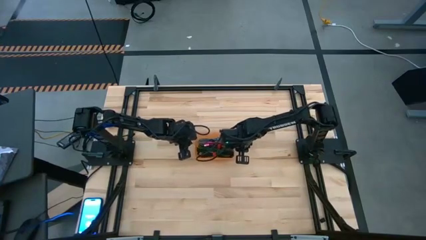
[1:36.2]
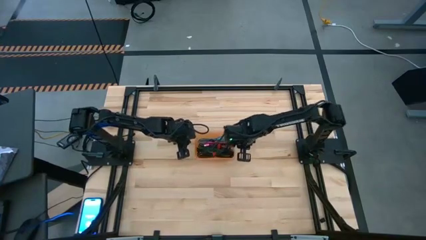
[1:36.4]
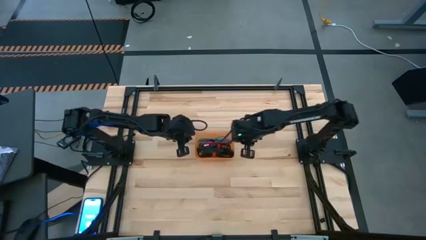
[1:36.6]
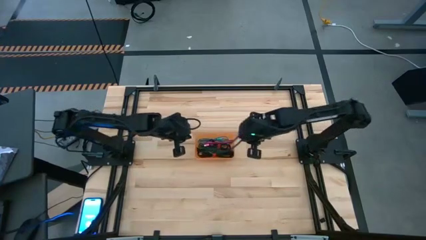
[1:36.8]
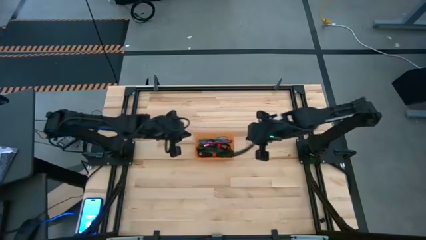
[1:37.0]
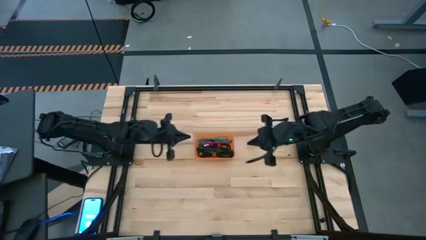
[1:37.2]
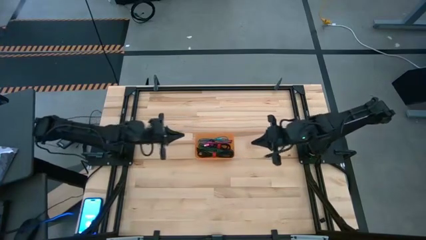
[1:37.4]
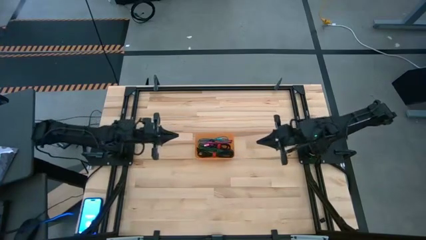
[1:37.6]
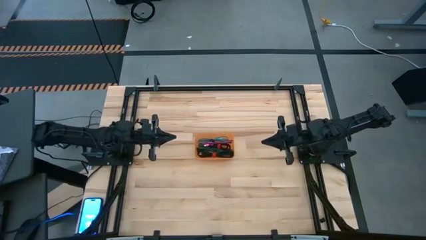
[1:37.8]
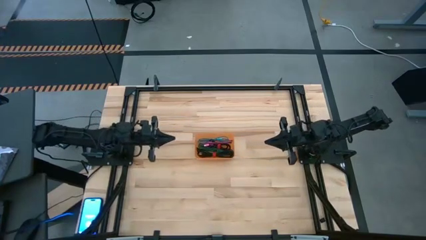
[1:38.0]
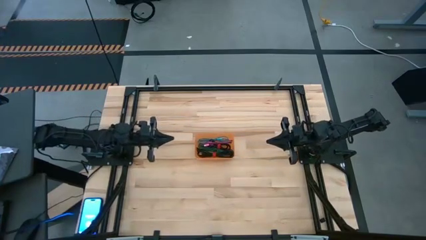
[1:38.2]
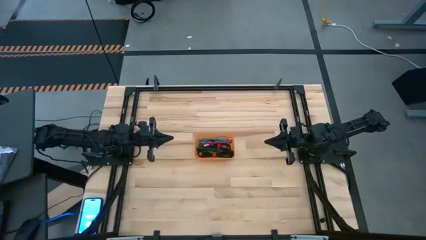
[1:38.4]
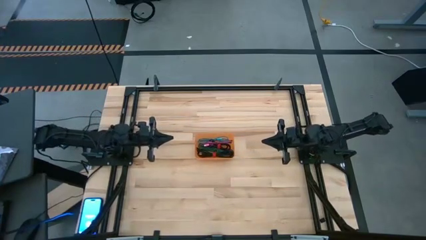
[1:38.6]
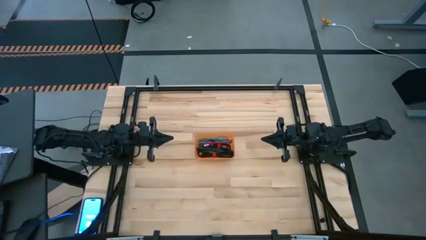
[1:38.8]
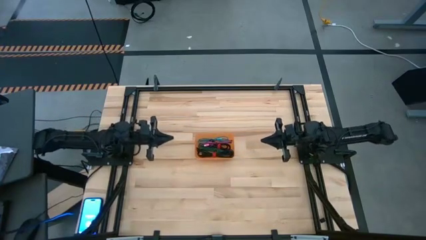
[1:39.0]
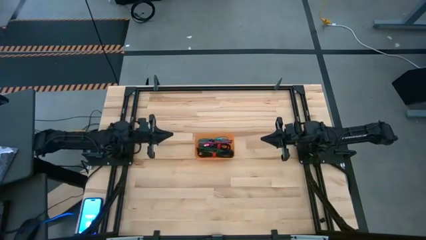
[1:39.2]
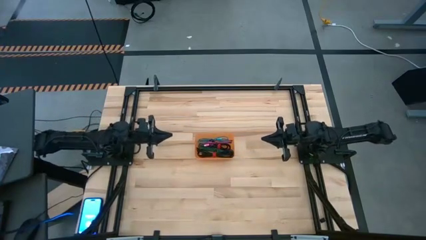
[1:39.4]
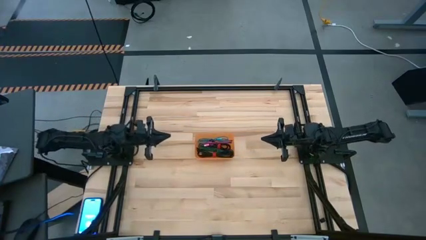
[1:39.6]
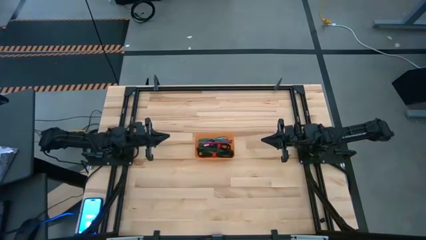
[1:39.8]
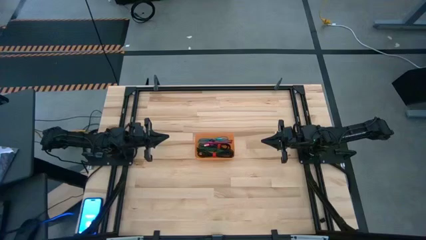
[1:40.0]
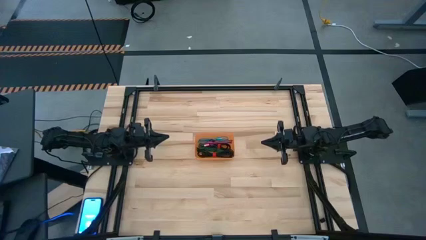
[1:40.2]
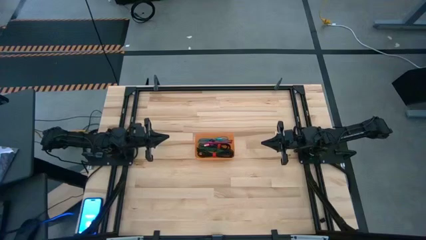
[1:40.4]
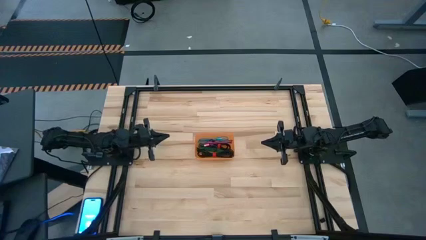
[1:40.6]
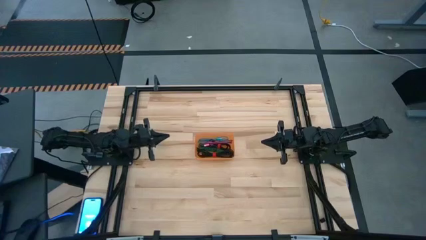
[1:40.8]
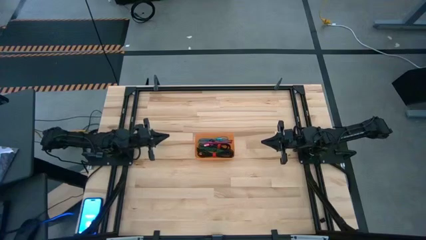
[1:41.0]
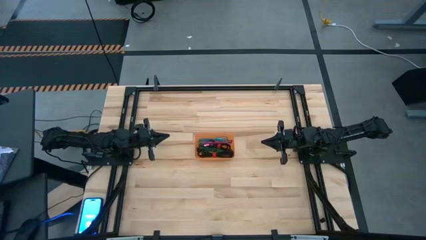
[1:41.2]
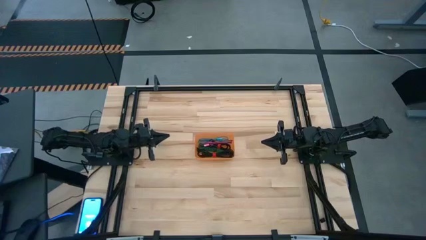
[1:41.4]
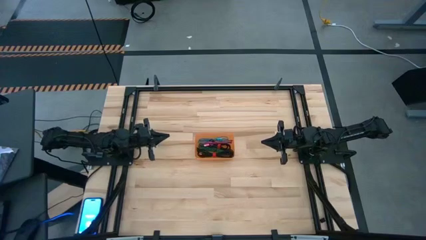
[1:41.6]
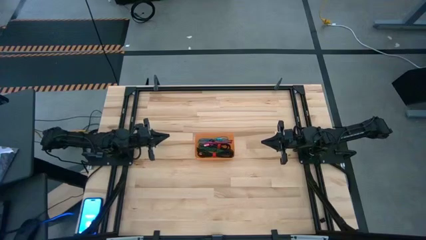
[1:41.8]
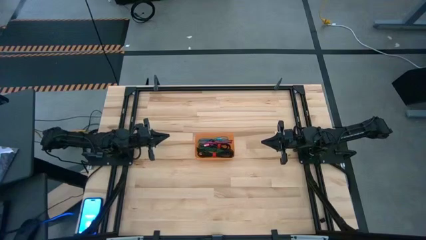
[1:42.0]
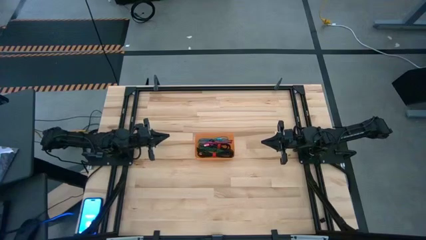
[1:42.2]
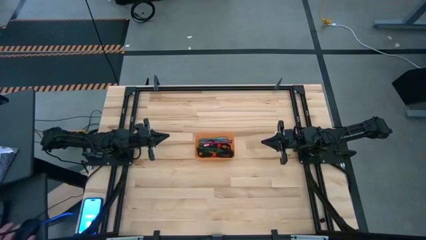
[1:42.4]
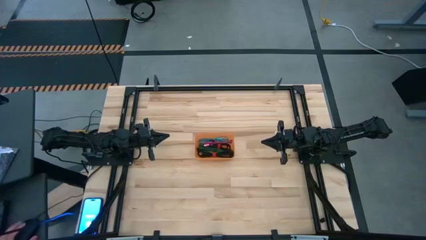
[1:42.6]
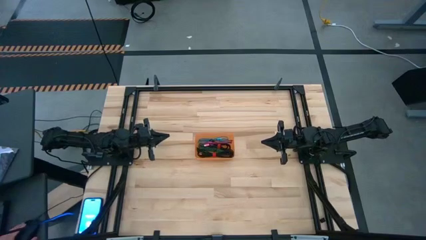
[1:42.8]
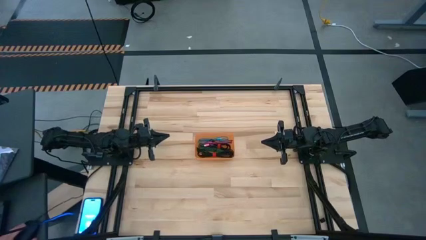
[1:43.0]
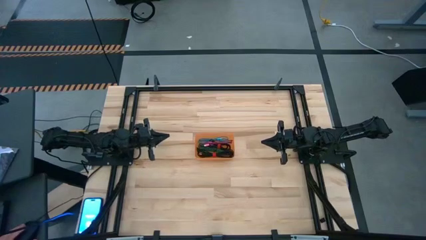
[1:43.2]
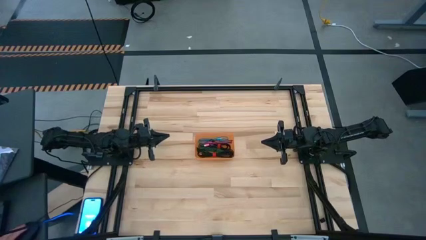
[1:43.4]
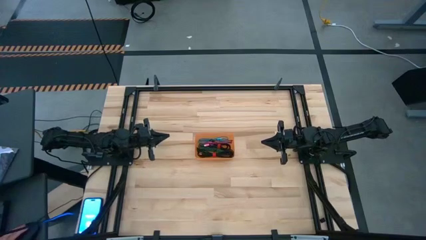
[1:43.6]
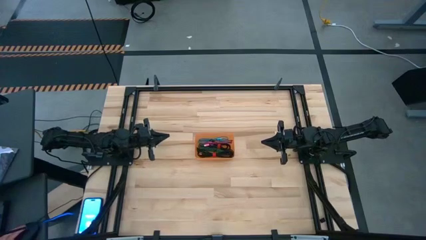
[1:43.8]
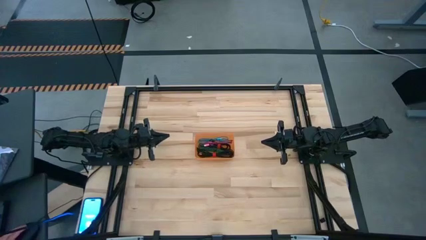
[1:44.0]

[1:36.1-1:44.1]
Task: Pick and place USB-C Cables
Return to Home Position

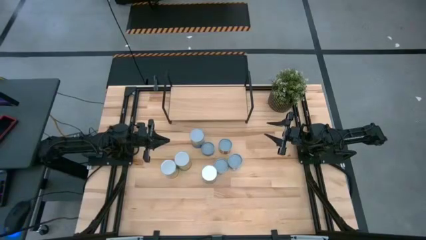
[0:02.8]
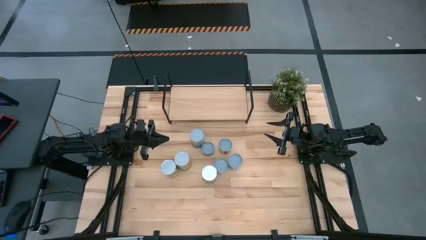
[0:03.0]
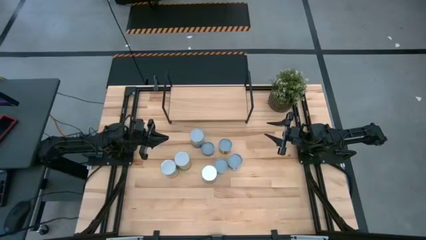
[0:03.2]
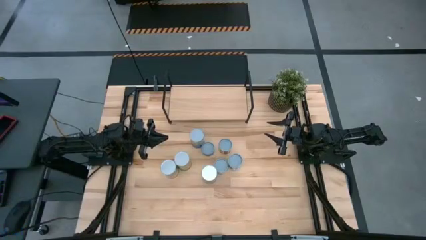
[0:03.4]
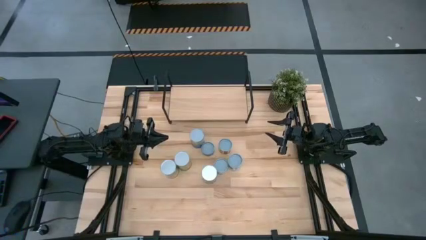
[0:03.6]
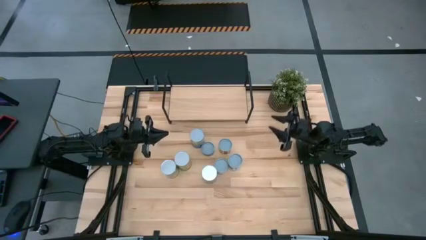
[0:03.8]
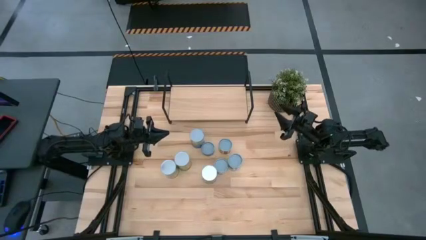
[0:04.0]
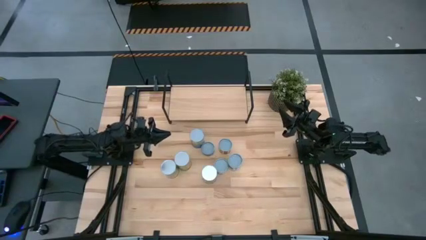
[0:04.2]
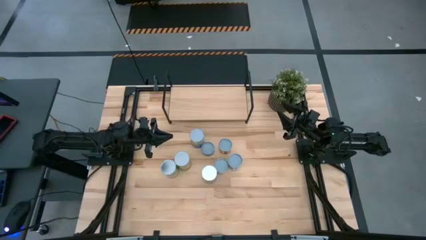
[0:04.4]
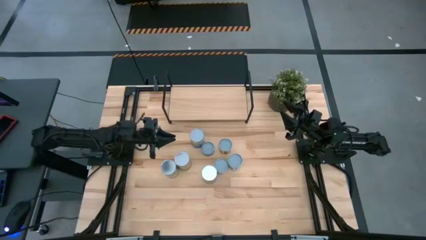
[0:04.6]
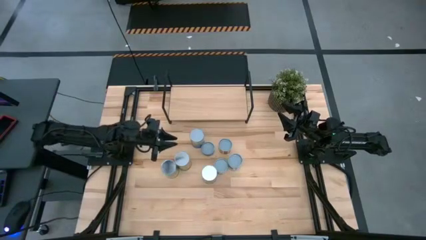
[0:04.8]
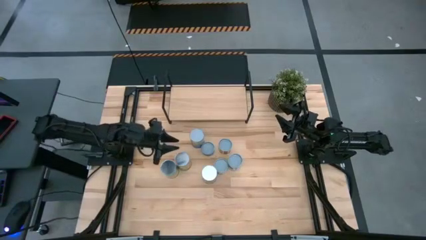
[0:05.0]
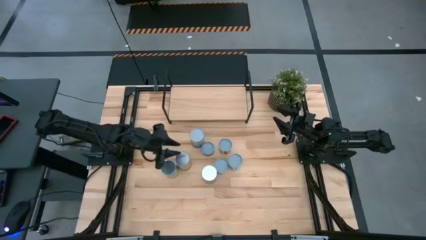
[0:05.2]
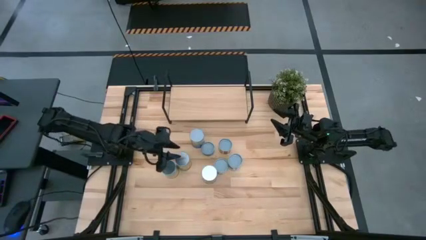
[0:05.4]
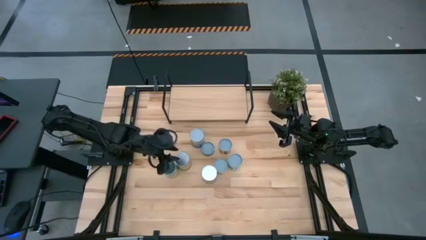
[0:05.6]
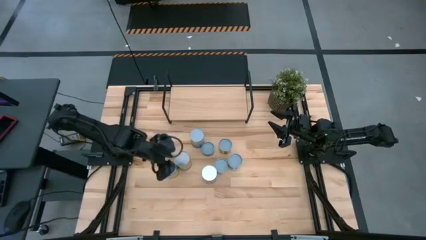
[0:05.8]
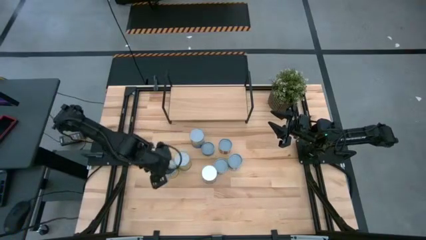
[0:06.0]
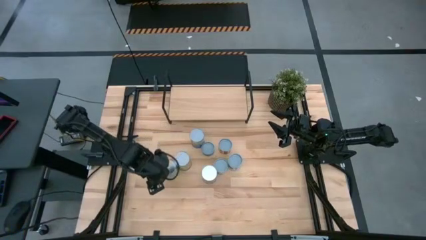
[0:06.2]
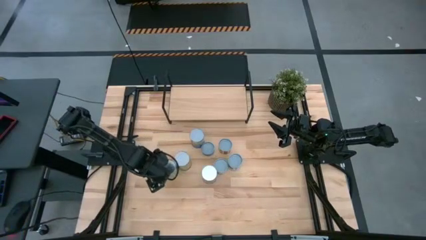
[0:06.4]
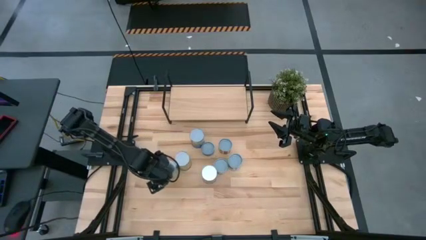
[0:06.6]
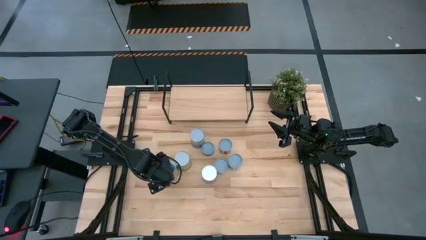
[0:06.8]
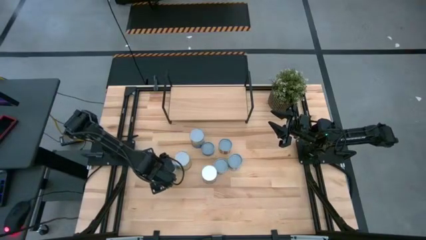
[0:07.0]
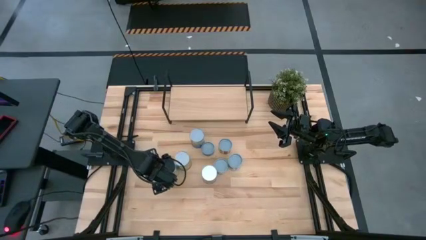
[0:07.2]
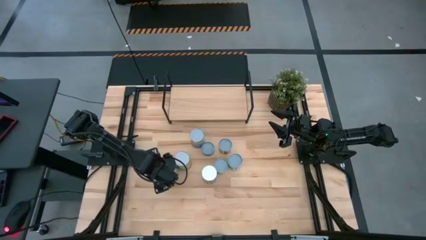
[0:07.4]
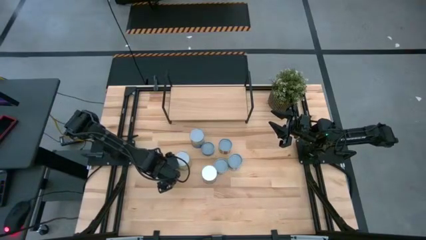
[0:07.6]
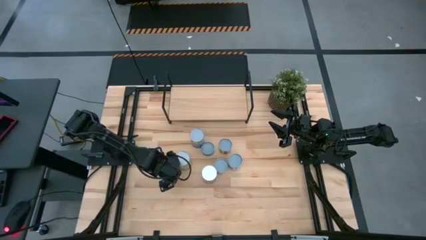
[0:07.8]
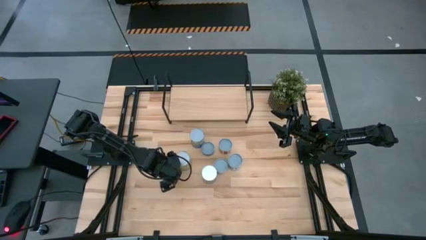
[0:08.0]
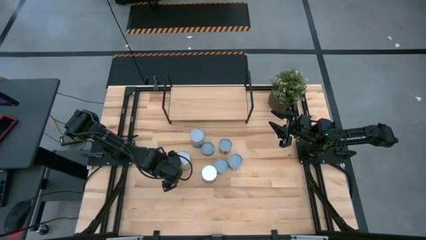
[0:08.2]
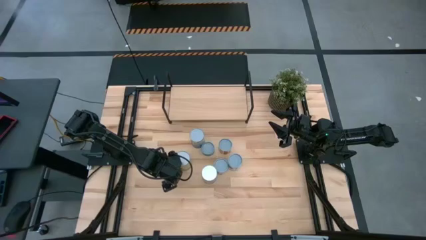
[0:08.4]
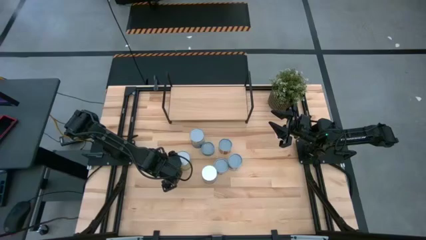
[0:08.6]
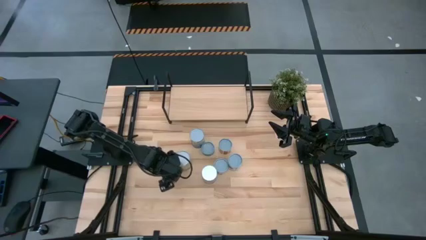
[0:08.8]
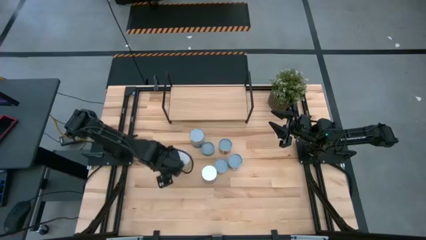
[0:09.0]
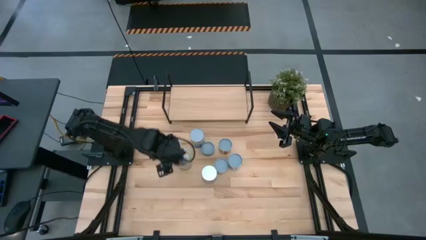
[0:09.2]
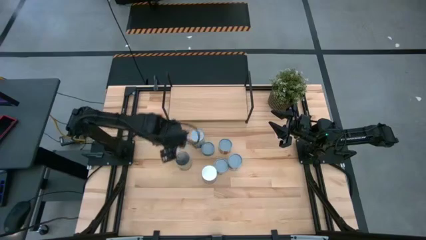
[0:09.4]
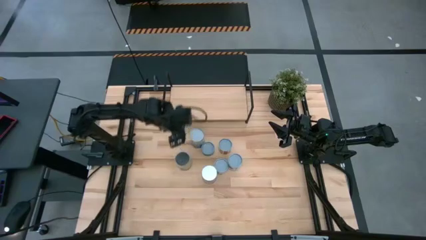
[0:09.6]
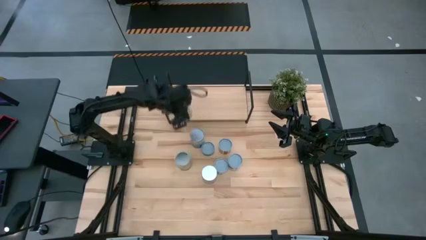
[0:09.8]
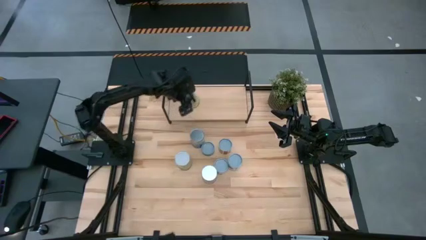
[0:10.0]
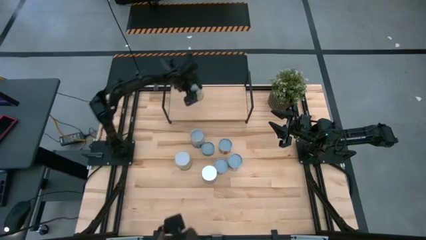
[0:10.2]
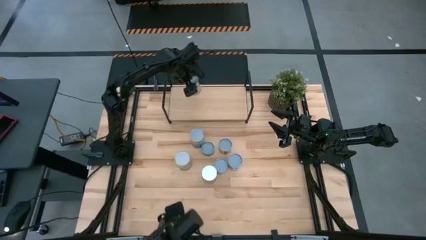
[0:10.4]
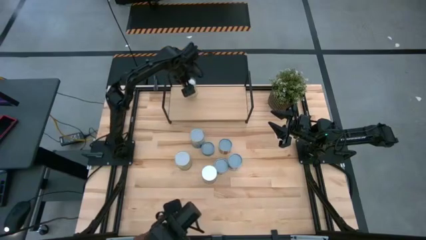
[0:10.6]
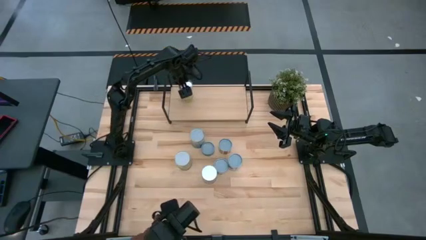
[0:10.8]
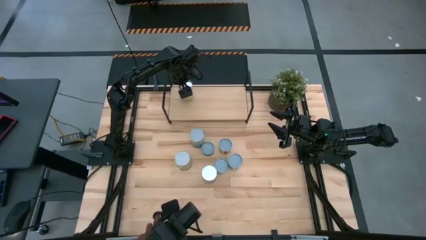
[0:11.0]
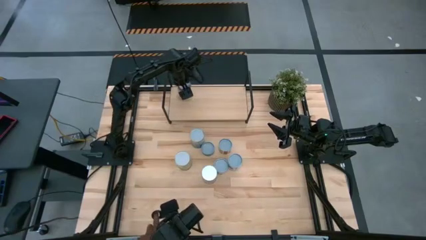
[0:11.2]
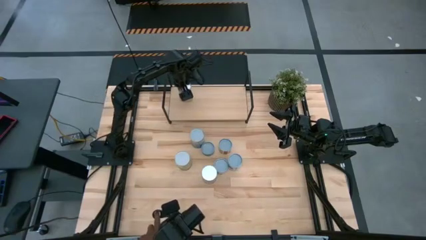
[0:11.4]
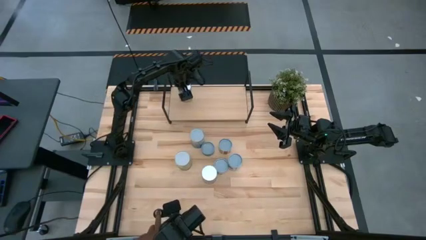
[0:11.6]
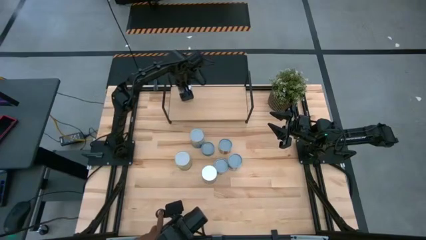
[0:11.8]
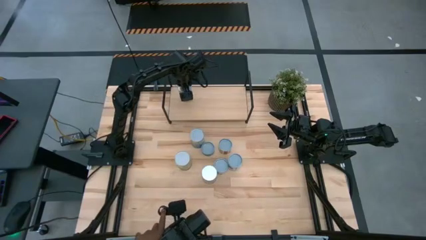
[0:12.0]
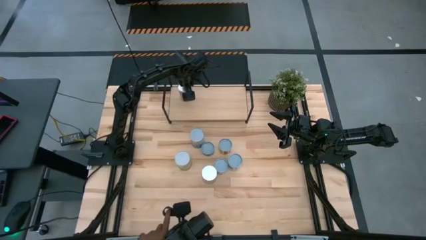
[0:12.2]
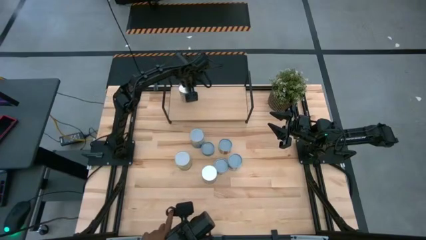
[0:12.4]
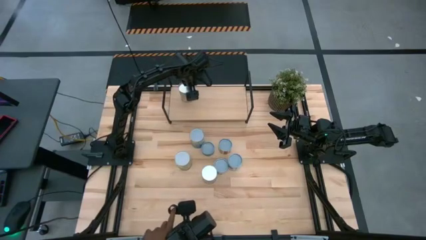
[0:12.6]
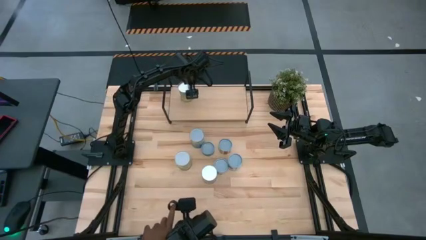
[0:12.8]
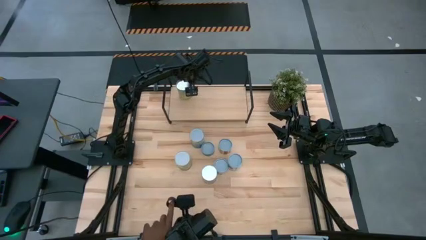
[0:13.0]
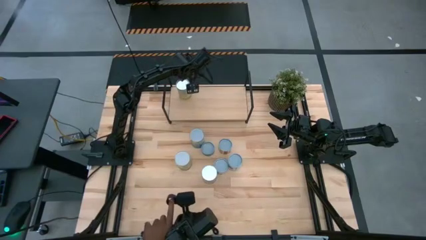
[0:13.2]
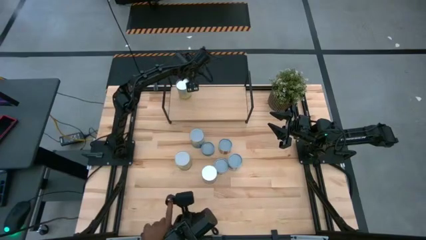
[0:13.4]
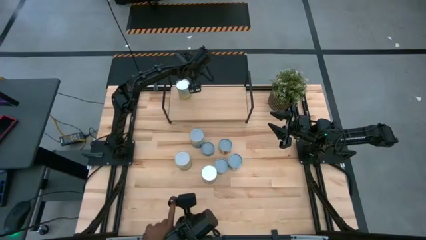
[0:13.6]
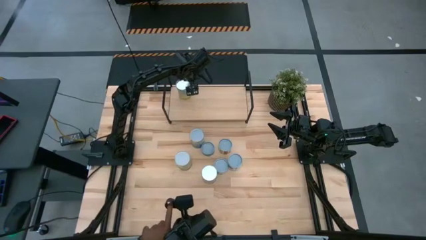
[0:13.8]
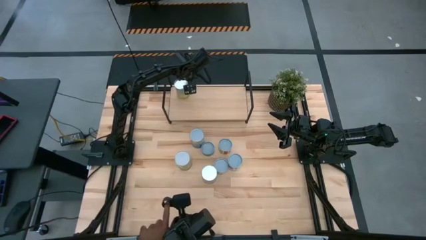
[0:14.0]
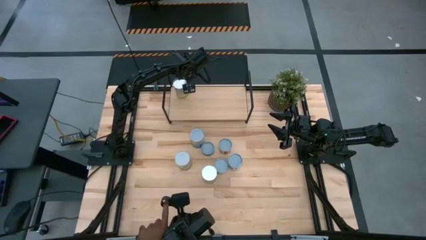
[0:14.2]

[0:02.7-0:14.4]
Task: Pick and place cans onto a shelf
Put the canned carrots on the shelf
